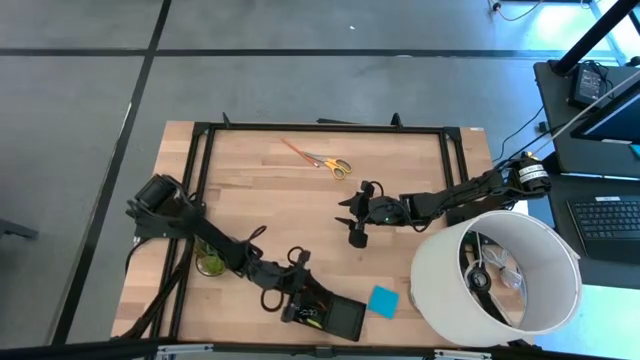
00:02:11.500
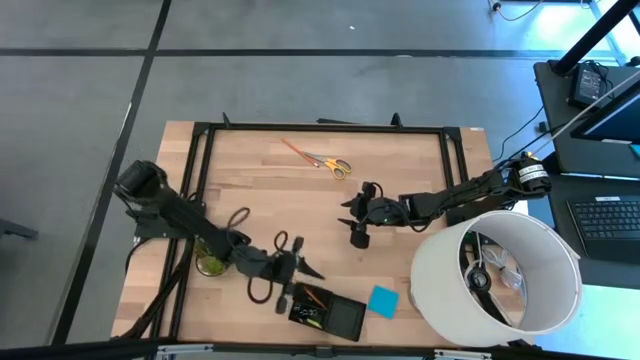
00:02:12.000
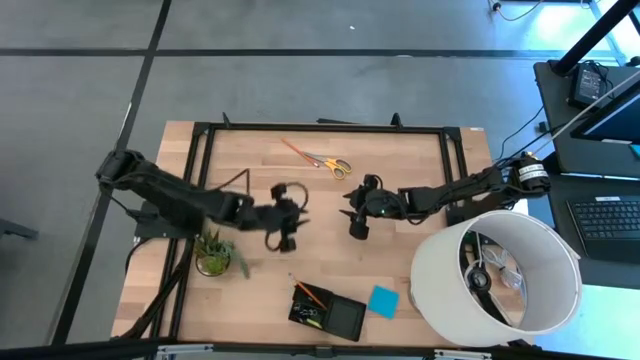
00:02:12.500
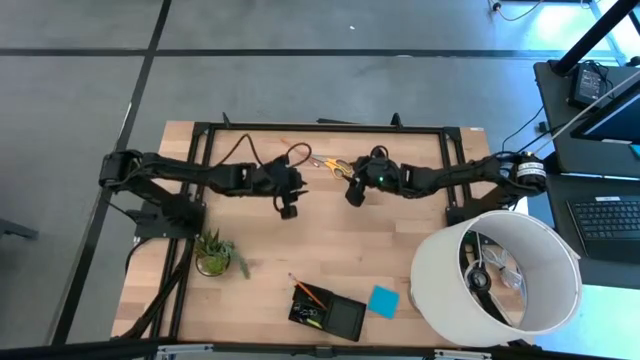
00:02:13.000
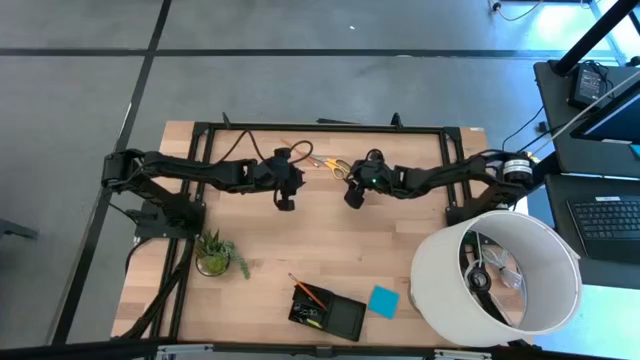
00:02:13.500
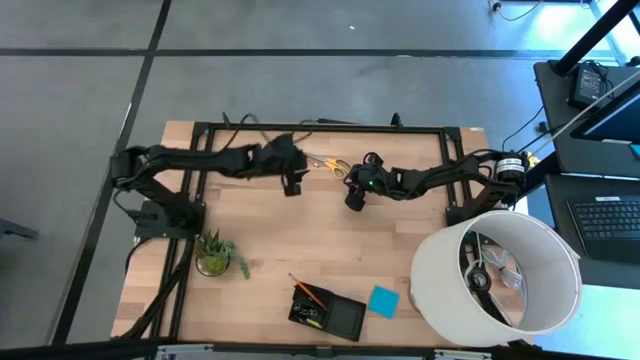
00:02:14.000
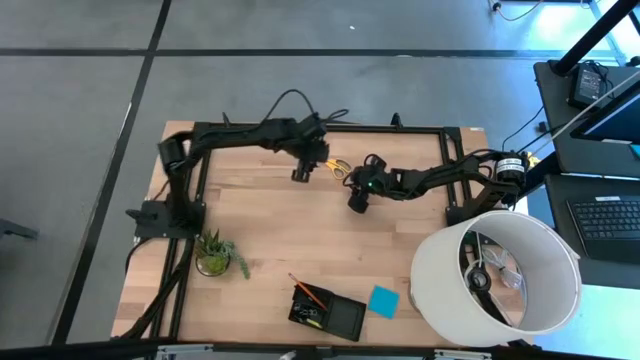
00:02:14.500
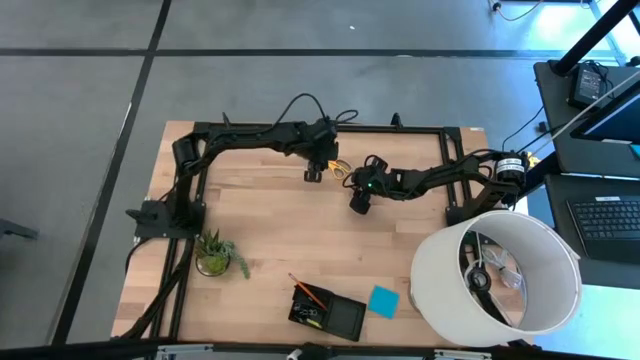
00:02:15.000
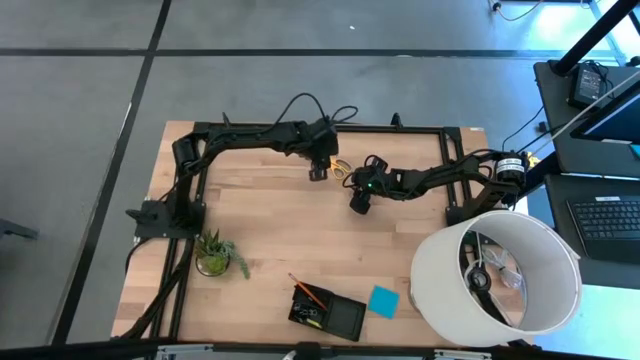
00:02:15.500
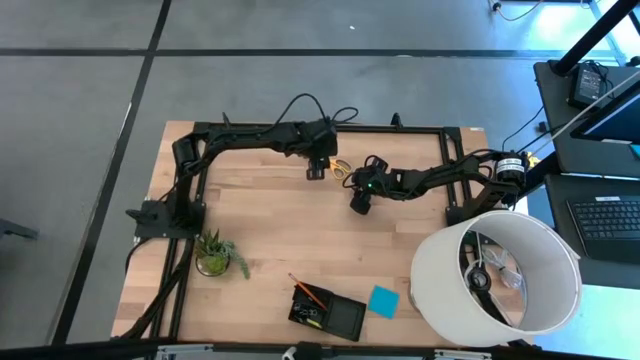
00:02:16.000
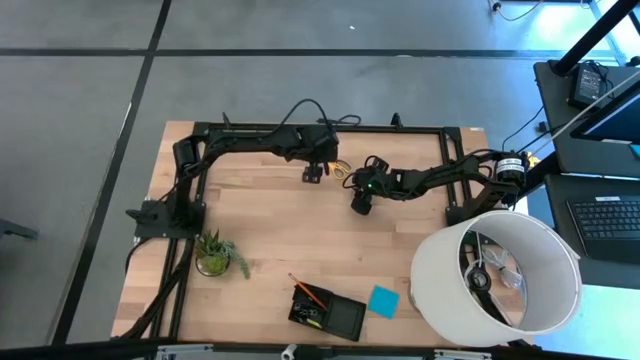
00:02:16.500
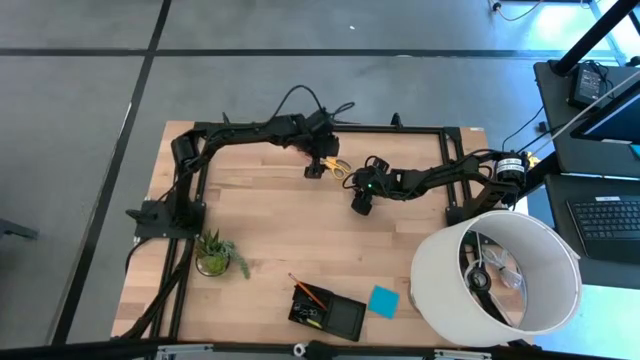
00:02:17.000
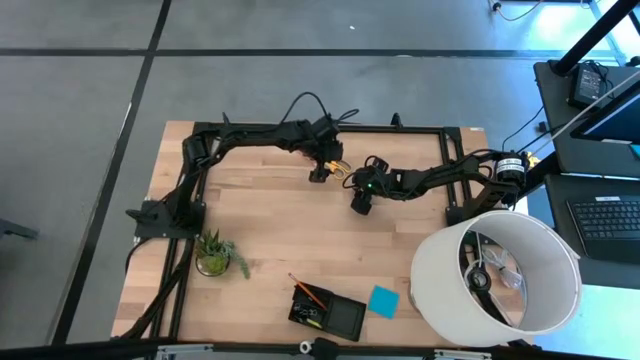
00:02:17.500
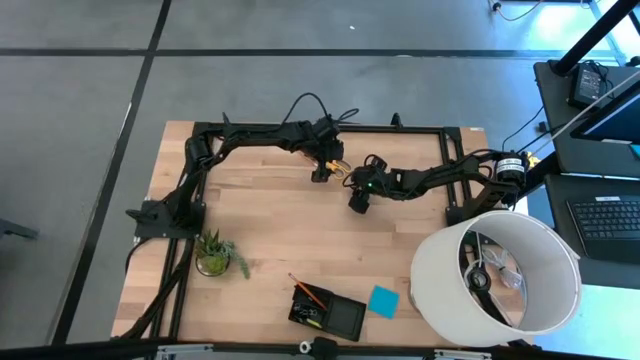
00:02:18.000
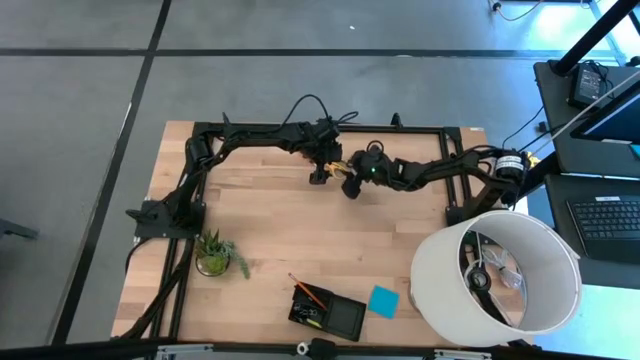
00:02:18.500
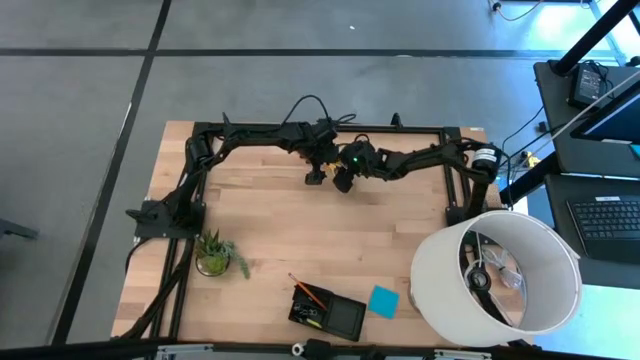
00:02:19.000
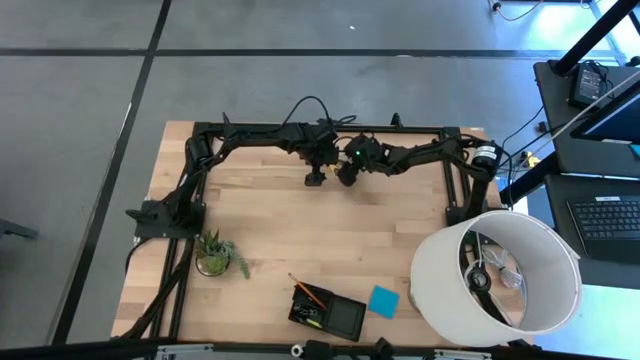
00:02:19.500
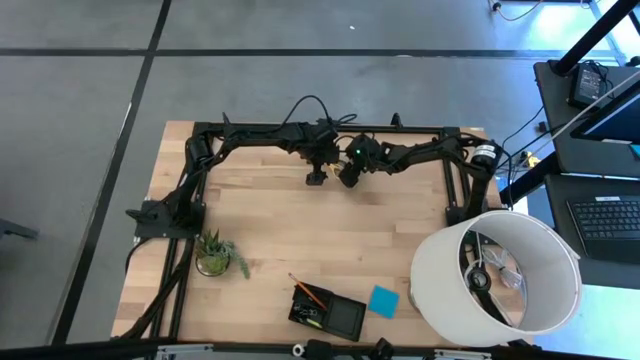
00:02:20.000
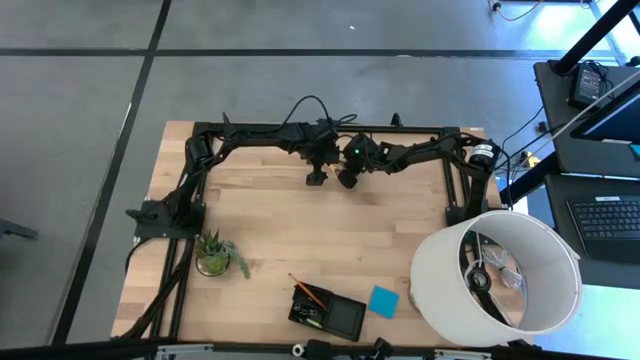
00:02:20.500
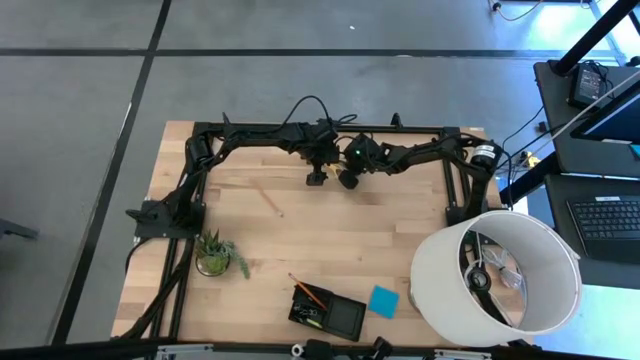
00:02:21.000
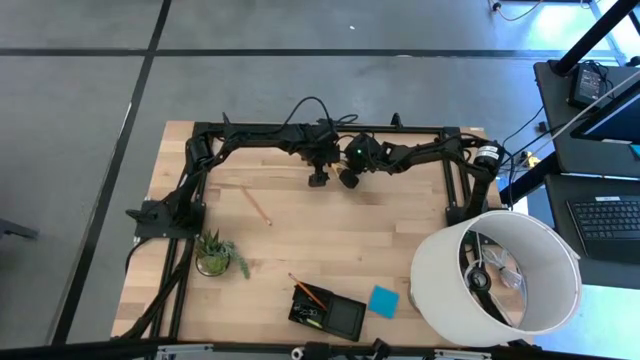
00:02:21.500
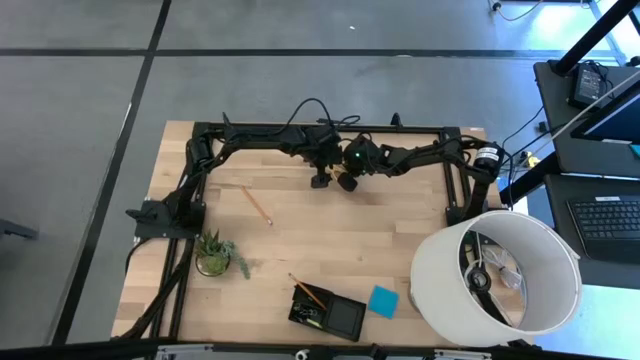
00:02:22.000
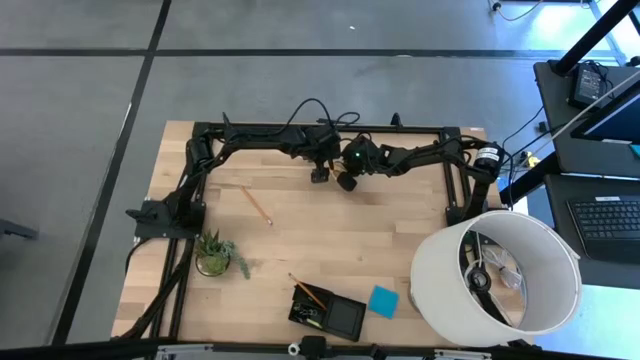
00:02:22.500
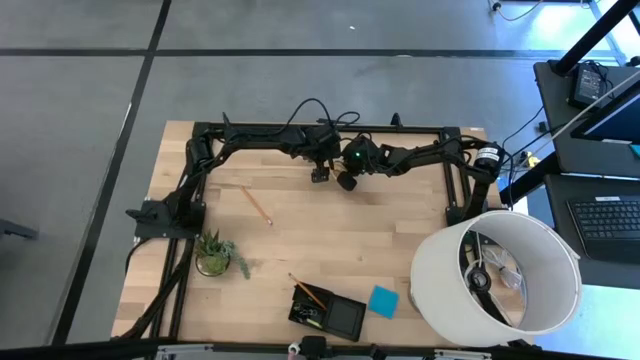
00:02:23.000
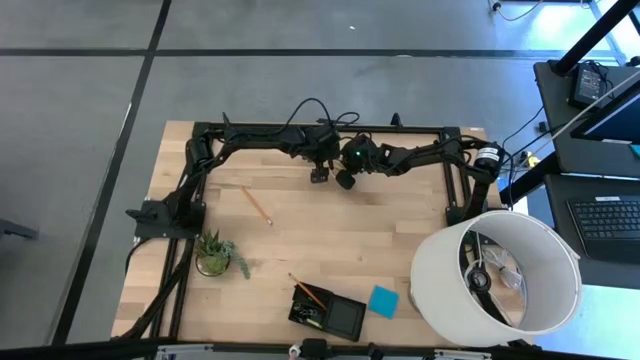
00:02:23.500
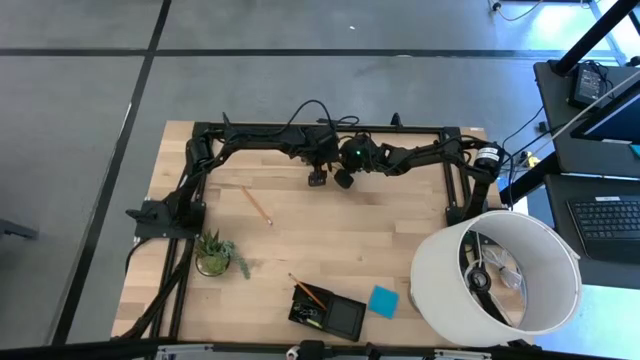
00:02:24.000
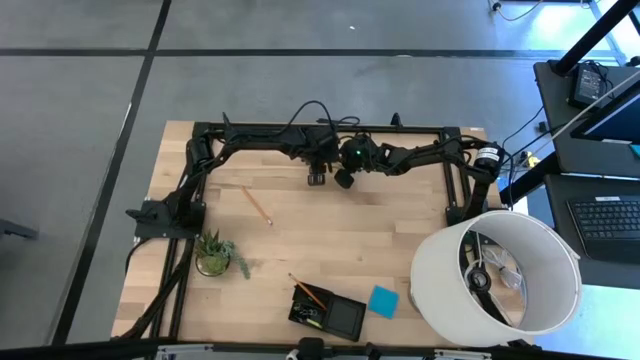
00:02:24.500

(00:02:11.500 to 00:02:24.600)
Task: Pick and place office supplies into organizer
Put the yellow scissors into the black desk organizer

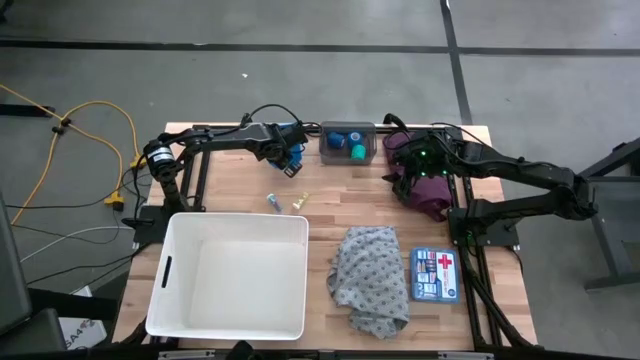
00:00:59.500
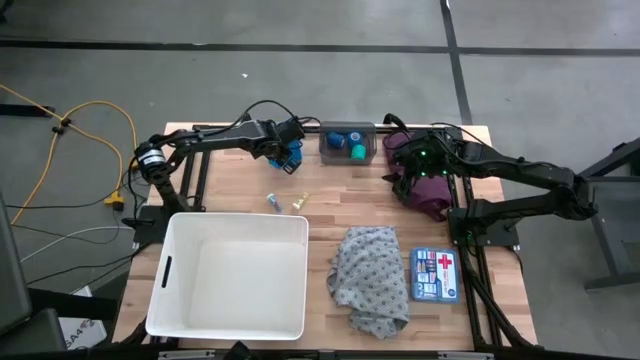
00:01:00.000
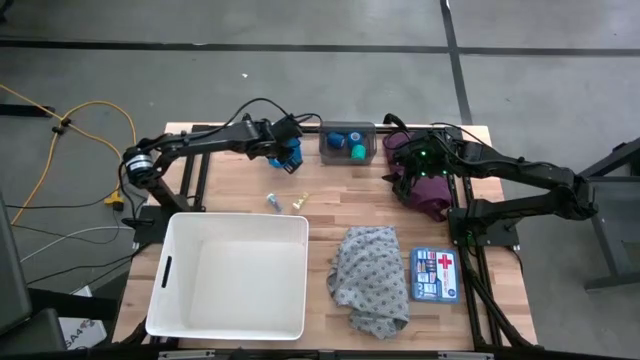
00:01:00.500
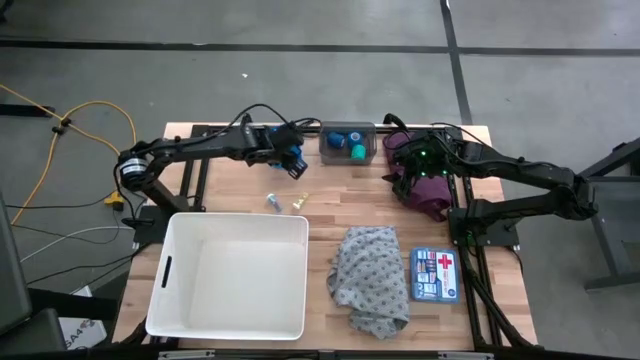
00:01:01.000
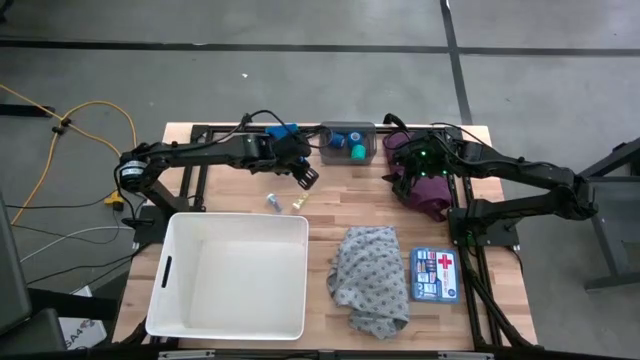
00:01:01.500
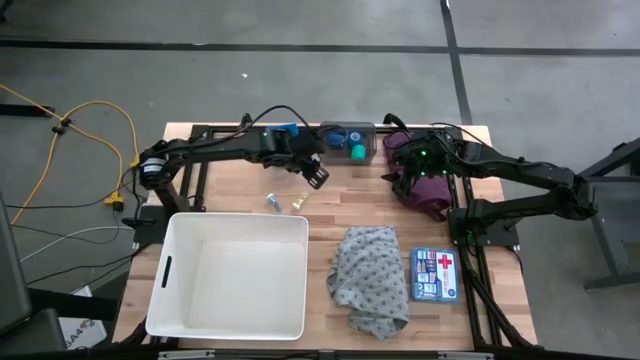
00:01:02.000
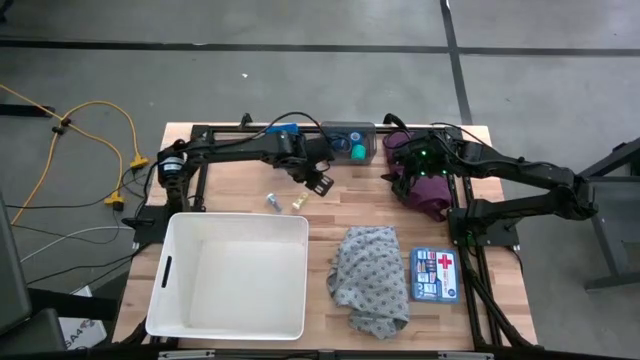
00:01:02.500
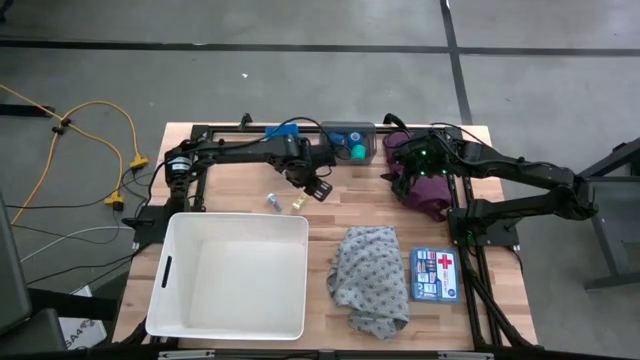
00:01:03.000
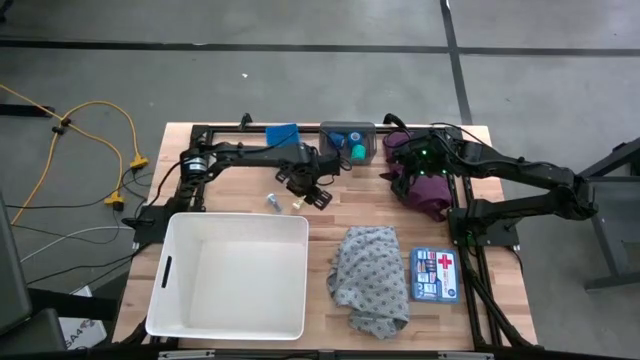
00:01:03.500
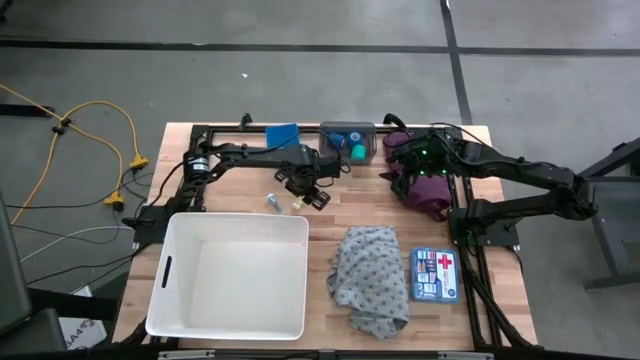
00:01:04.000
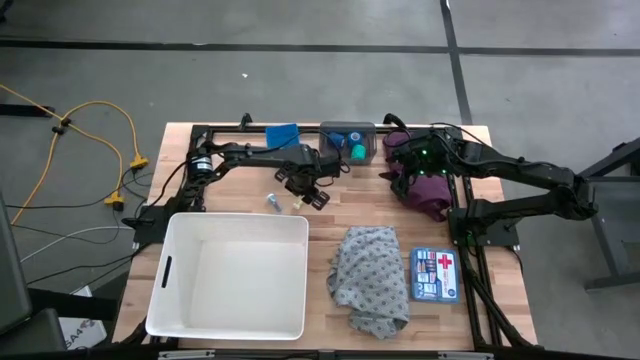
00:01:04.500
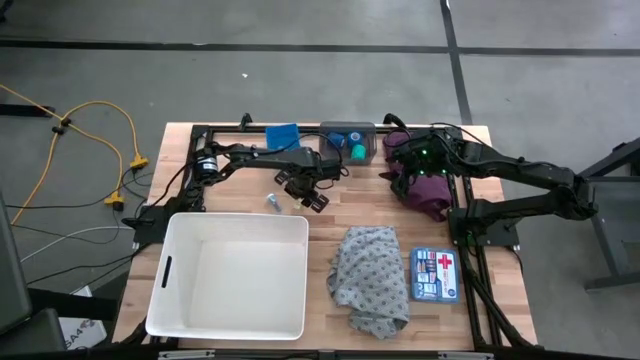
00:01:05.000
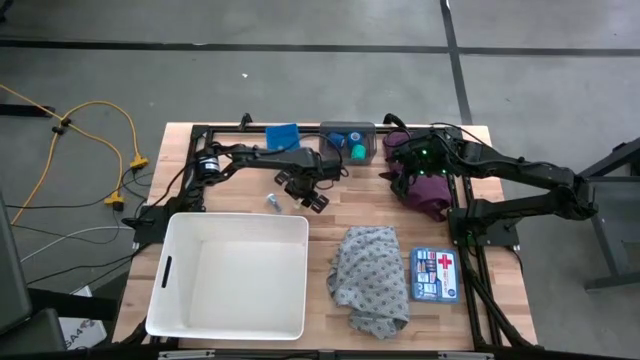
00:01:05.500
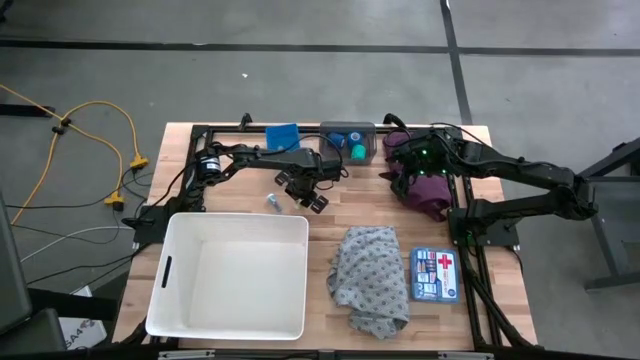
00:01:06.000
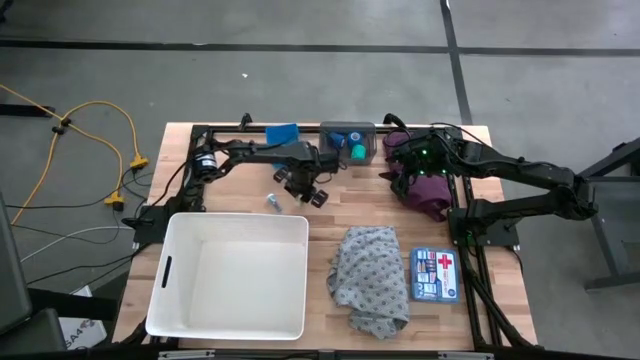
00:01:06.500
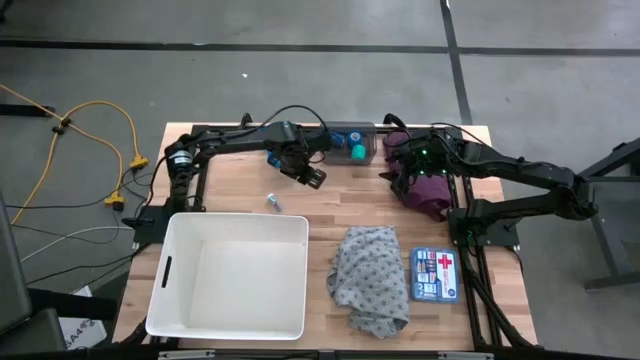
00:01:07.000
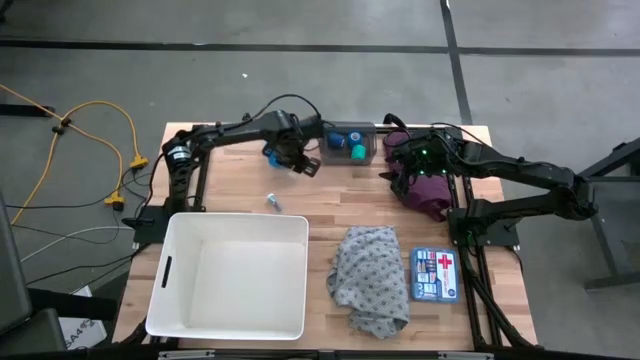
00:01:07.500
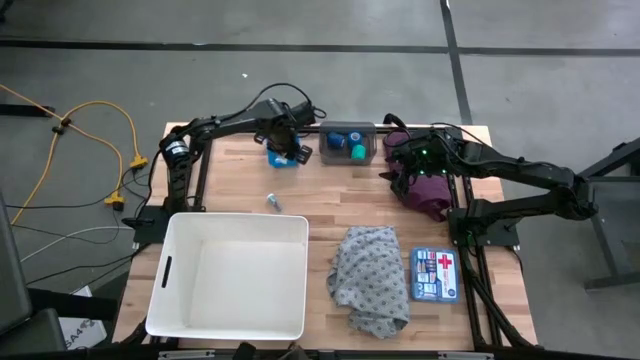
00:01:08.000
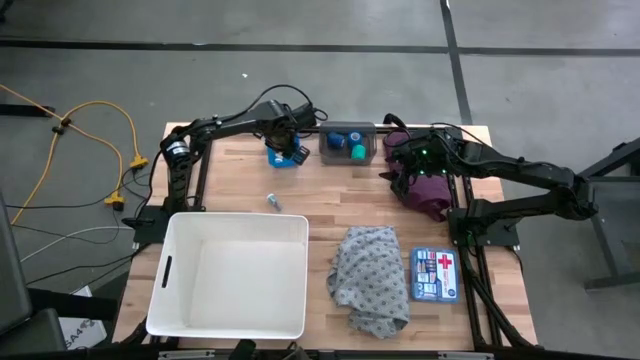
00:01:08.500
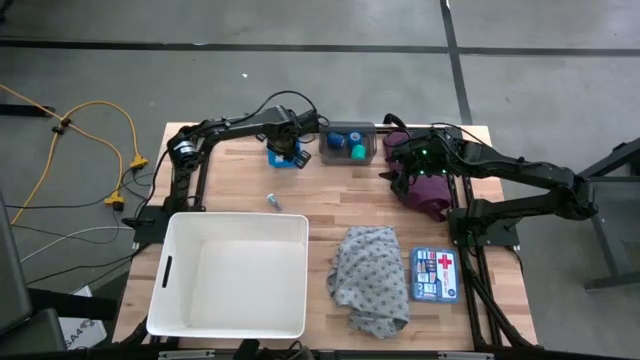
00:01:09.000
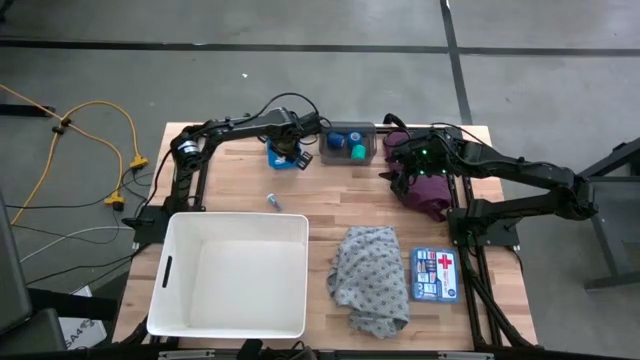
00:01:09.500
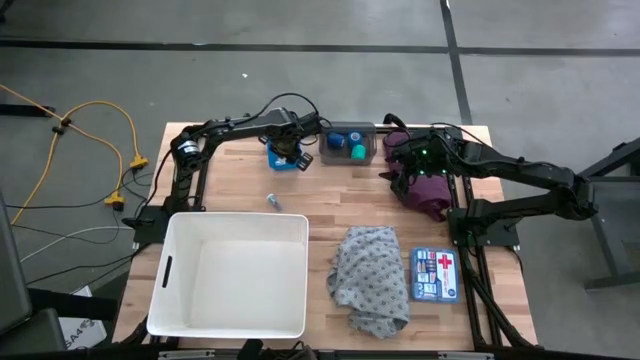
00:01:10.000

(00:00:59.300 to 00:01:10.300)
Task: Pick & place medical supplies in basket/bin
Put the yellow pill bottle into the blue basket
